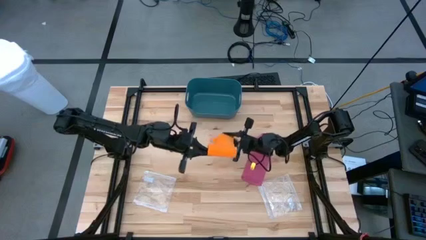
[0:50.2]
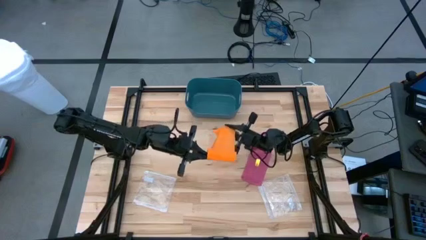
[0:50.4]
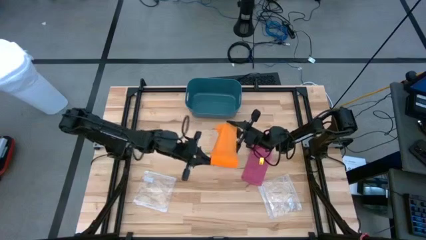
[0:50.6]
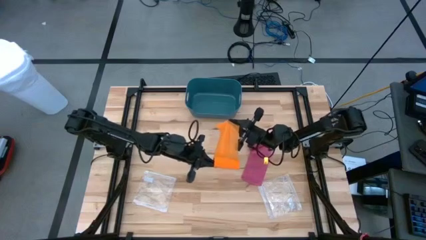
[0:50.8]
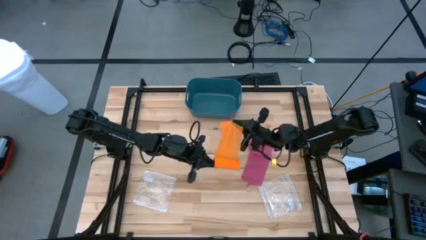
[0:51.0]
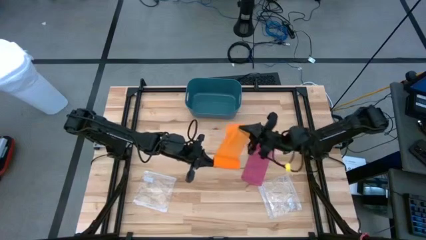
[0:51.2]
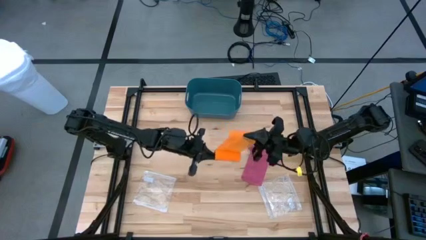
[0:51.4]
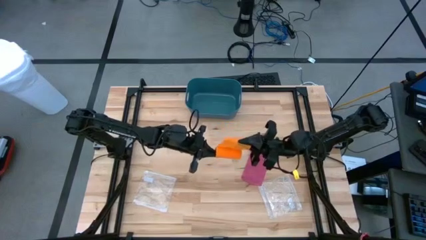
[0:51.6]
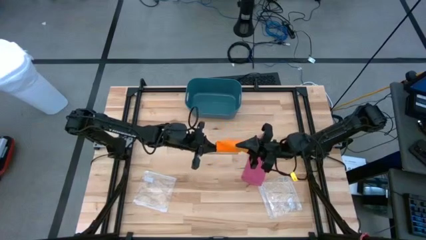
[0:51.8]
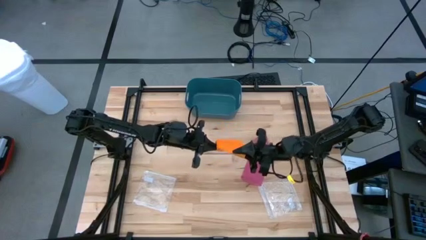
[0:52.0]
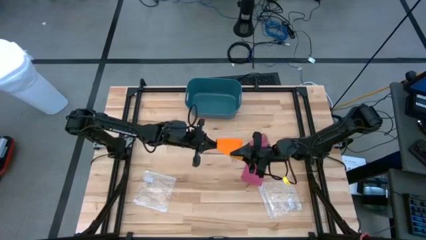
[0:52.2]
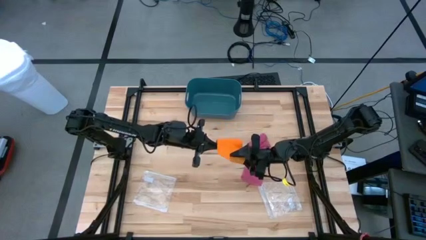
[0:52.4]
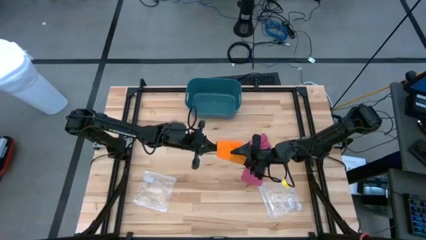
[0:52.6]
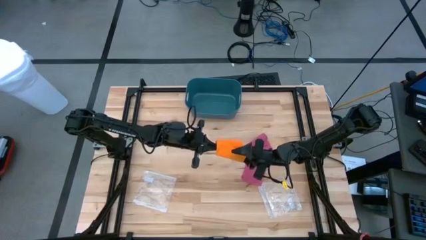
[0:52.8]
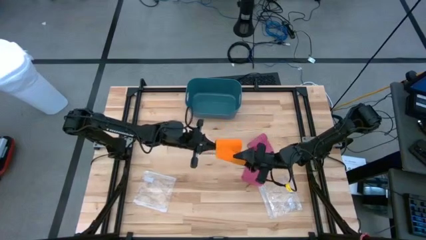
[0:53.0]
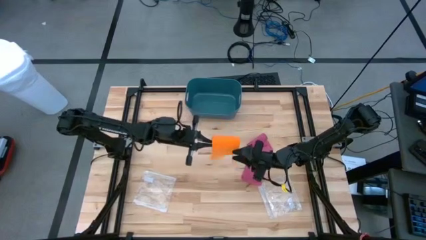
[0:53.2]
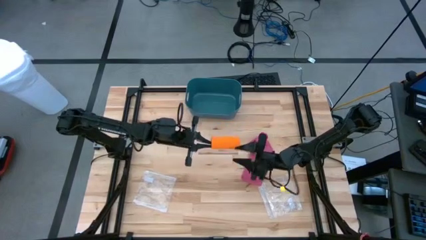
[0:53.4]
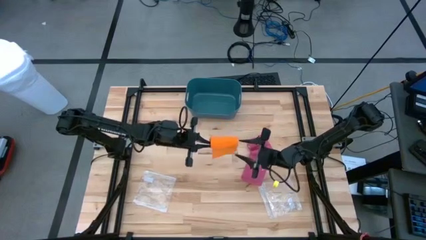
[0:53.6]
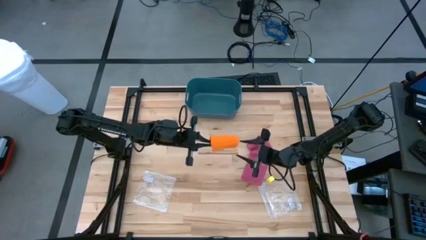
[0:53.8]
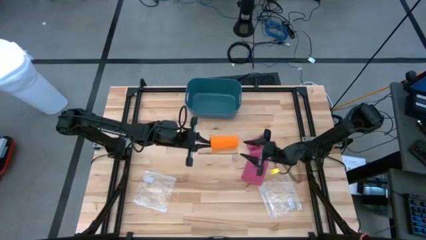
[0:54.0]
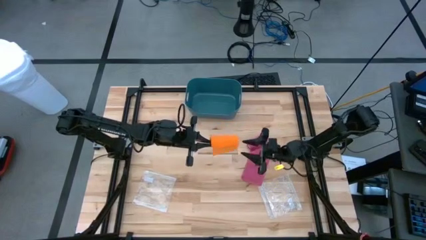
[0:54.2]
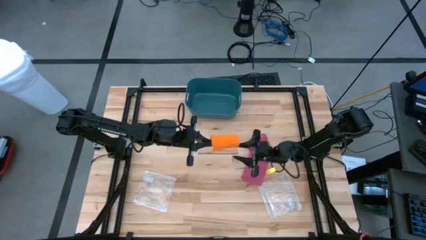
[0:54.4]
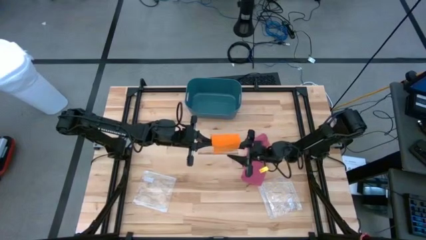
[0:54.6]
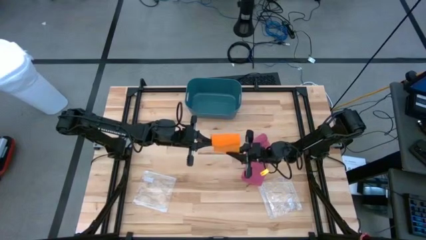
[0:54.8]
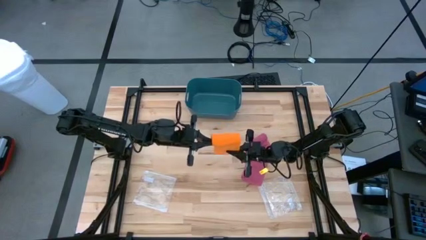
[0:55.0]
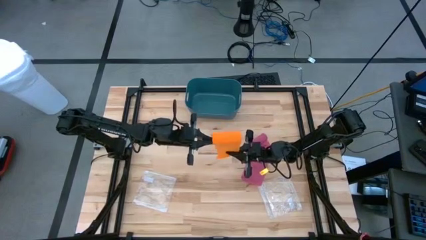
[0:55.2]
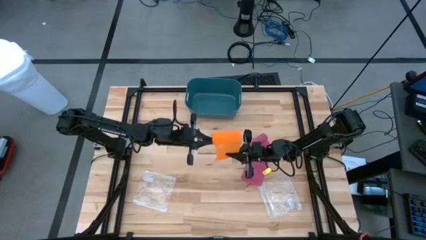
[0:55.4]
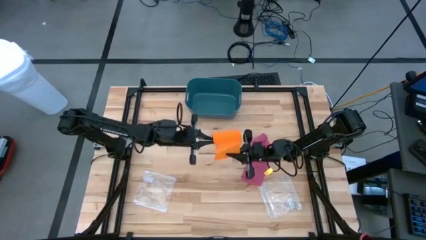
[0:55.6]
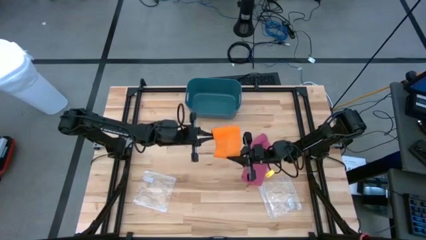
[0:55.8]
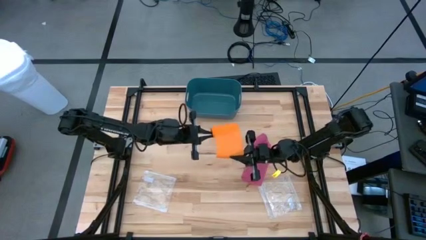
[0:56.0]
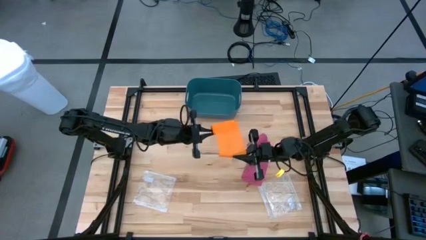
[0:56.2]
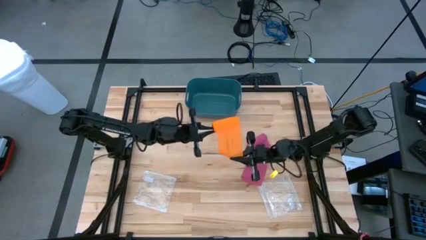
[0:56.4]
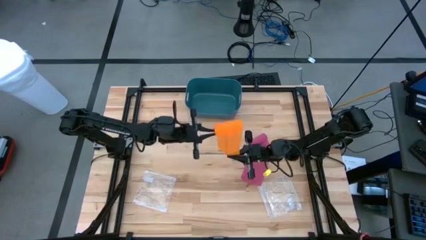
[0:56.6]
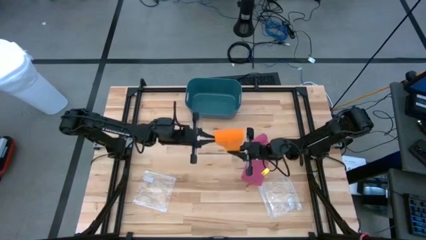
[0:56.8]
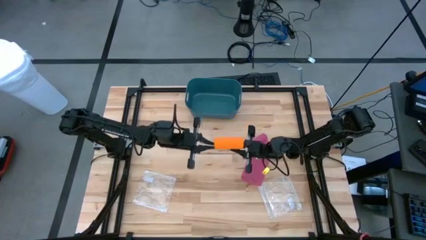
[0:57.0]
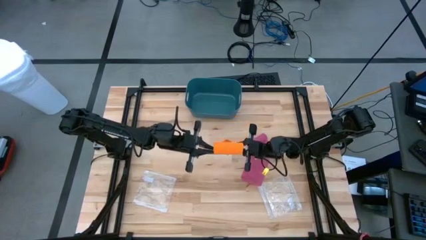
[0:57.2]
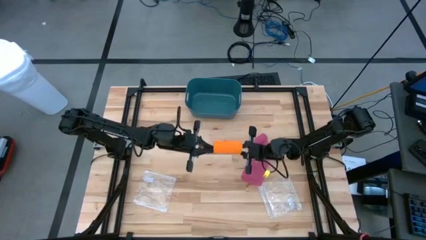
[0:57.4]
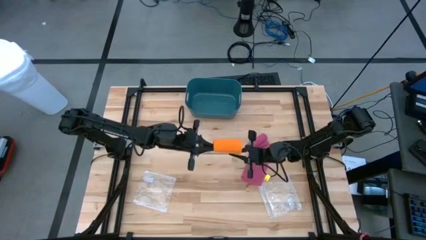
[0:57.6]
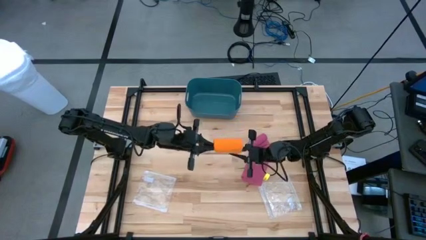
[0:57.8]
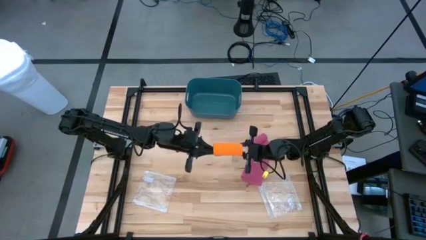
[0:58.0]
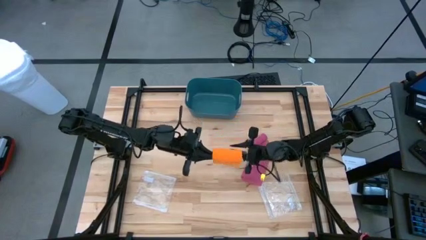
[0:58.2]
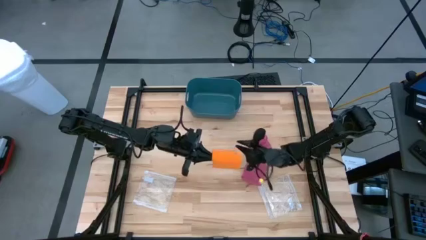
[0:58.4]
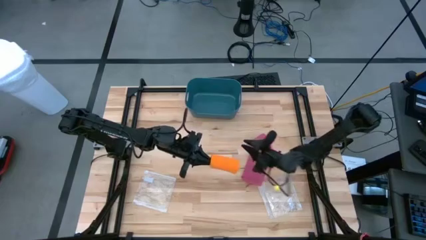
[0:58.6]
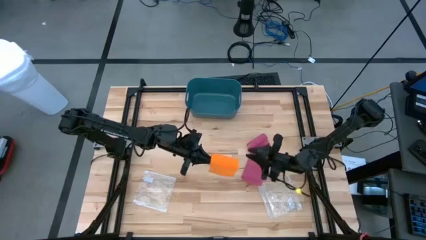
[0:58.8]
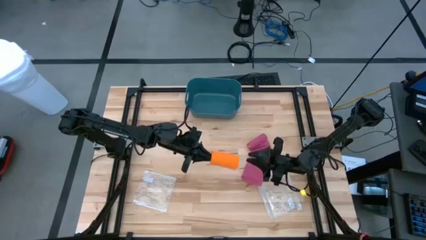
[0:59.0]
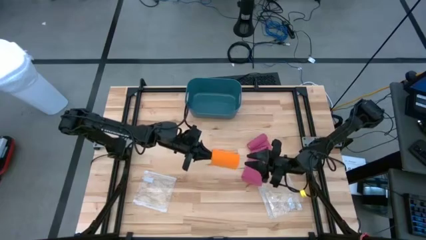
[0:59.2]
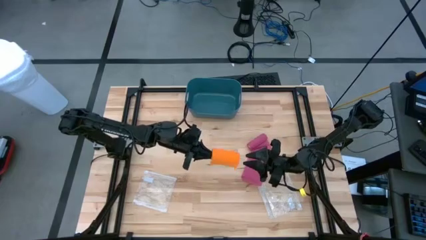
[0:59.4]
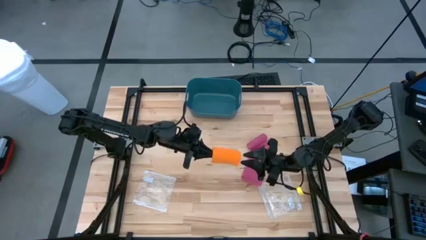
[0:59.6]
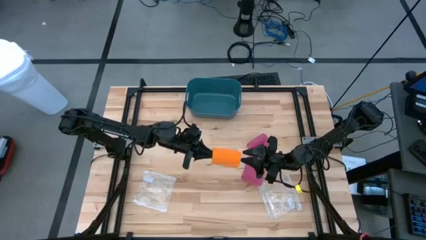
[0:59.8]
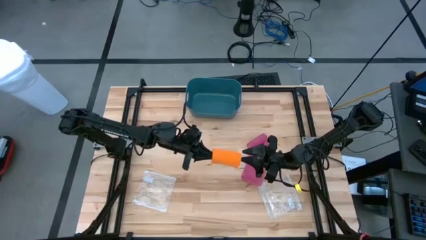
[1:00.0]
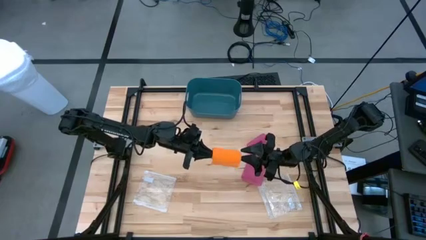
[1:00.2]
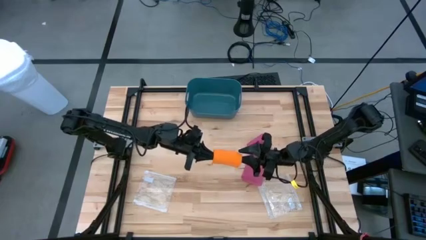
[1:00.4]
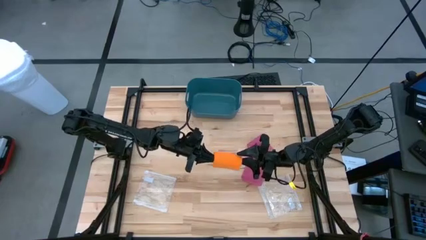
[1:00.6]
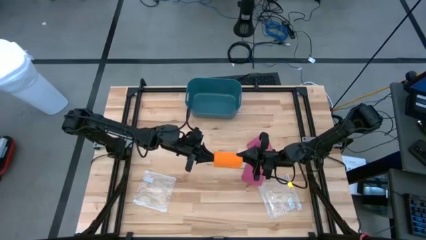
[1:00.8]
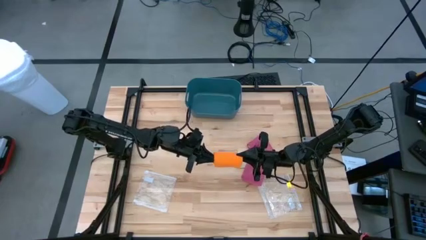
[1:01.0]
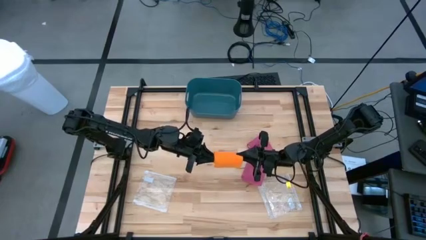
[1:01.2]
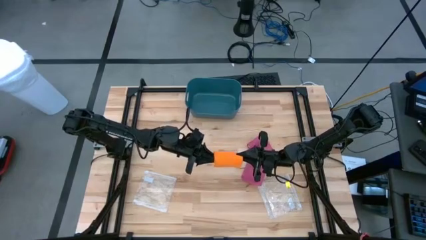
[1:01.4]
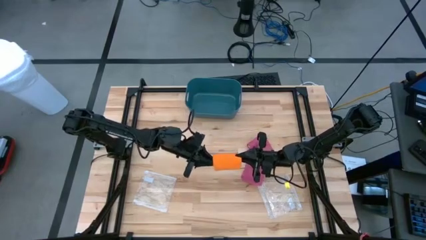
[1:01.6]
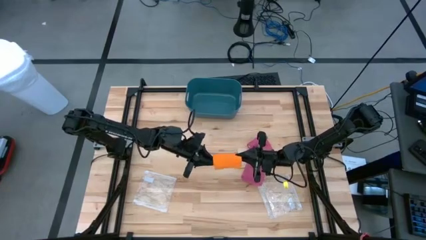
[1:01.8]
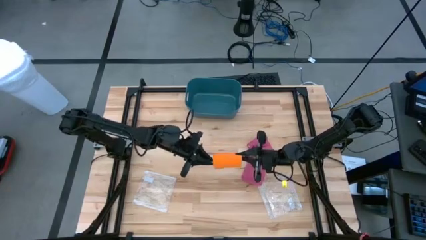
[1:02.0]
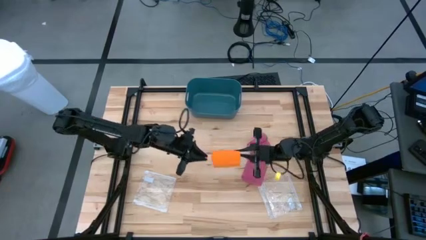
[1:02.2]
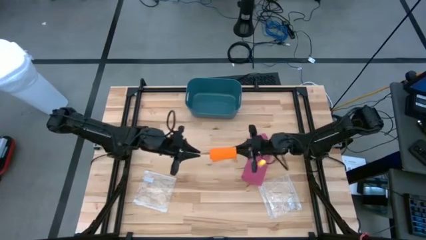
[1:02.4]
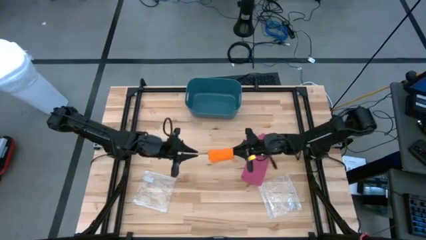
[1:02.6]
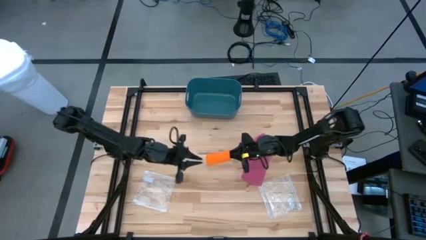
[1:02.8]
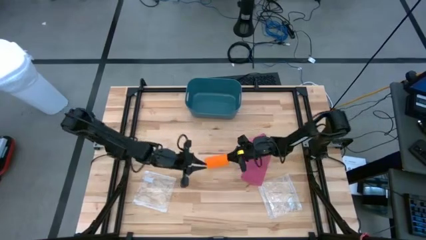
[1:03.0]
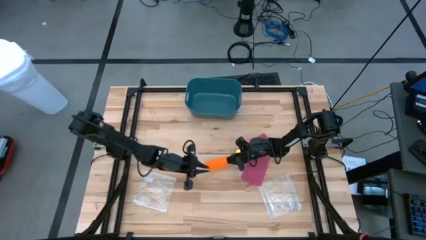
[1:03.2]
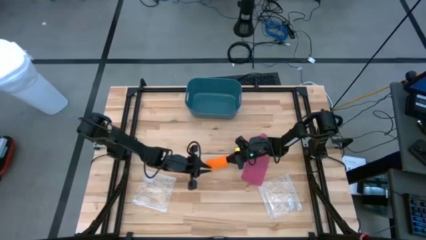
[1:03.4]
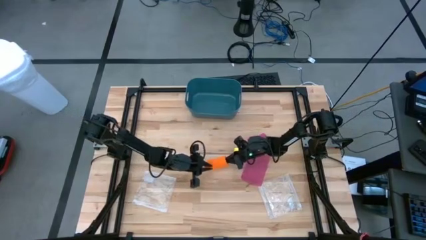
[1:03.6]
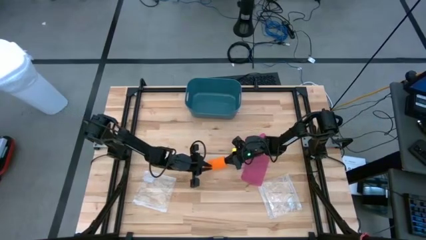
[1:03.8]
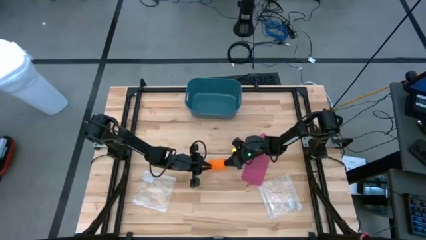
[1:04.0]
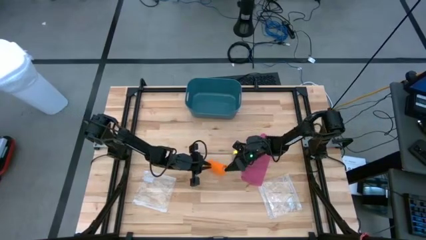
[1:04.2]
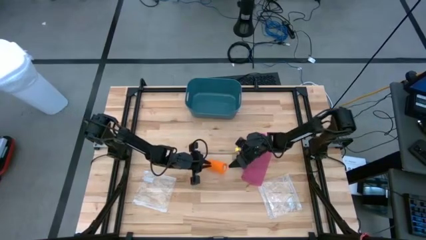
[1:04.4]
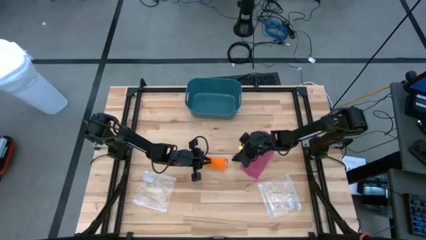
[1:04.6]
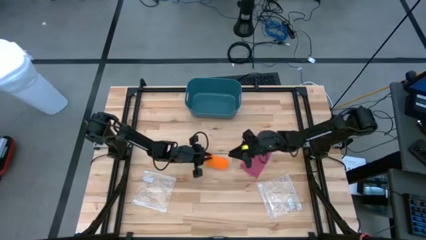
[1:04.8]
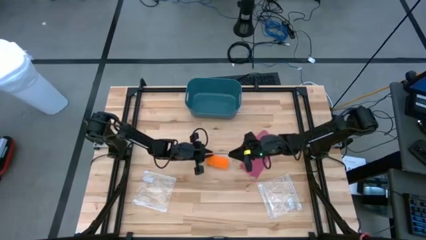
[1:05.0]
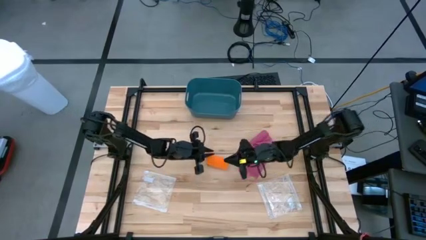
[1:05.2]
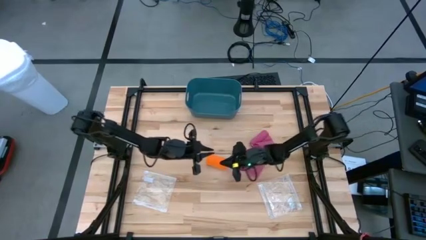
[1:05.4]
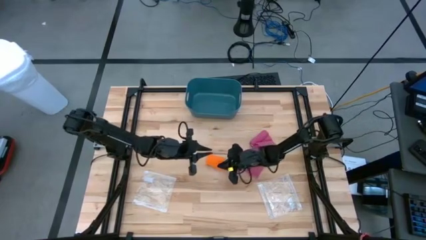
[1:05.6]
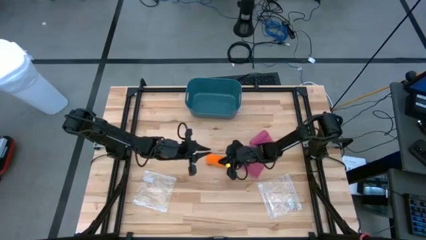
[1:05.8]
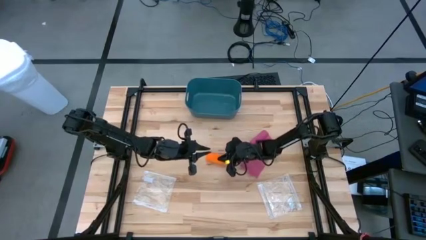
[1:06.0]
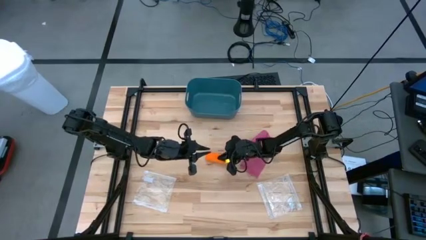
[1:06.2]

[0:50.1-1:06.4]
Task: Roll bandage
Roll the orange bandage
